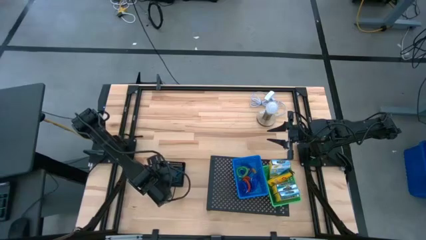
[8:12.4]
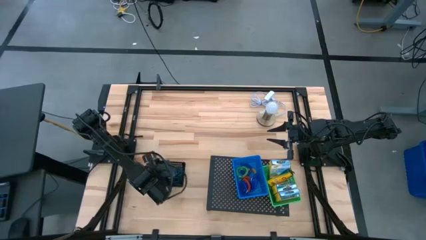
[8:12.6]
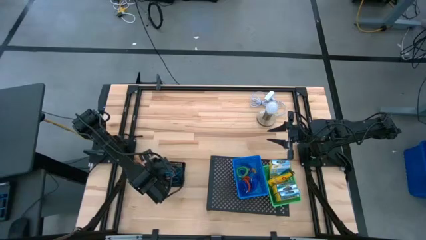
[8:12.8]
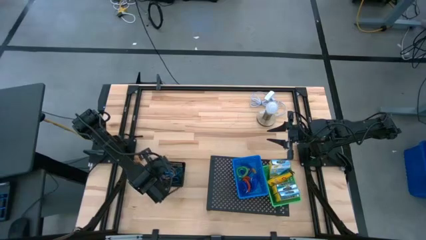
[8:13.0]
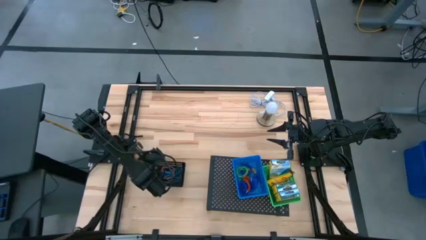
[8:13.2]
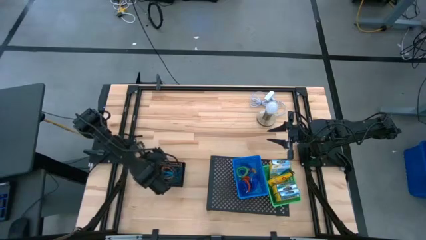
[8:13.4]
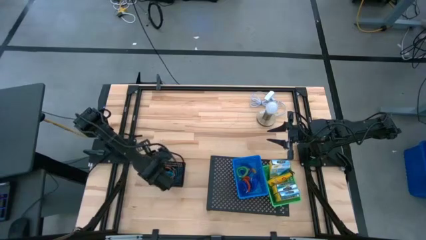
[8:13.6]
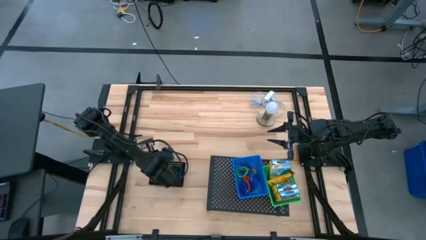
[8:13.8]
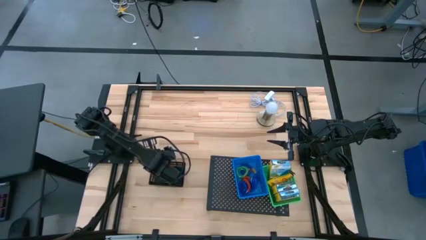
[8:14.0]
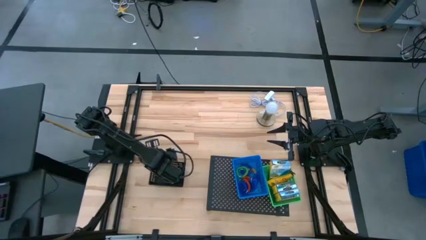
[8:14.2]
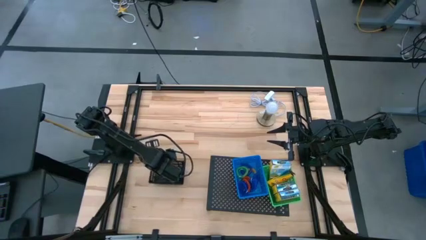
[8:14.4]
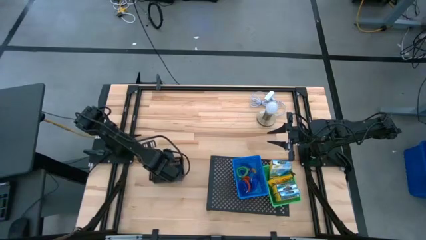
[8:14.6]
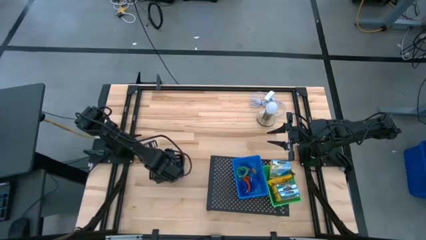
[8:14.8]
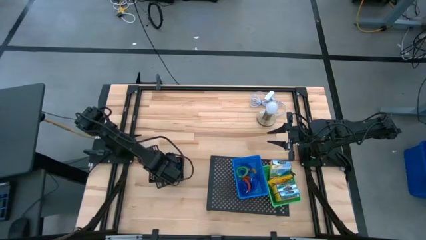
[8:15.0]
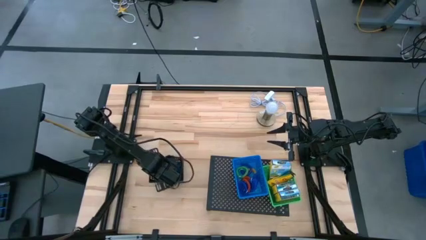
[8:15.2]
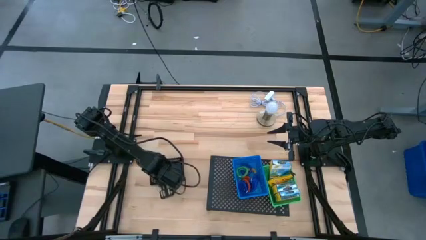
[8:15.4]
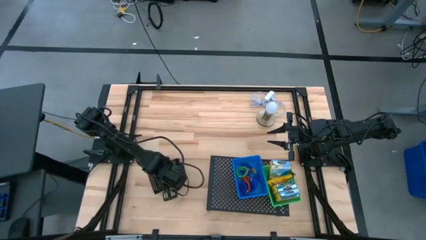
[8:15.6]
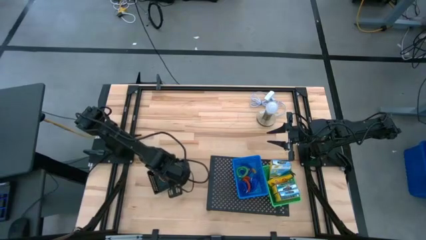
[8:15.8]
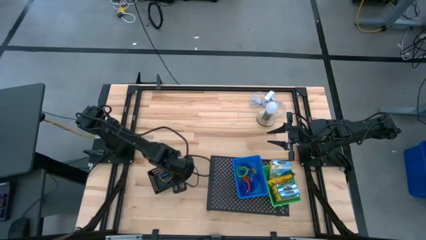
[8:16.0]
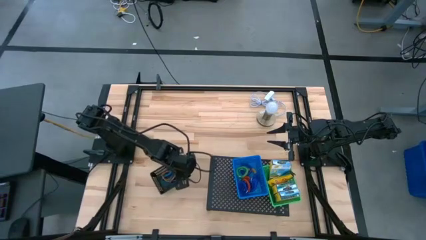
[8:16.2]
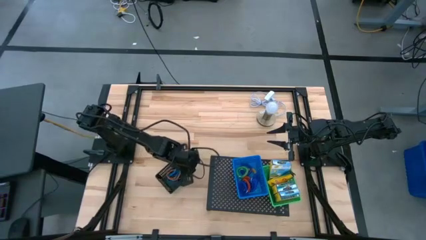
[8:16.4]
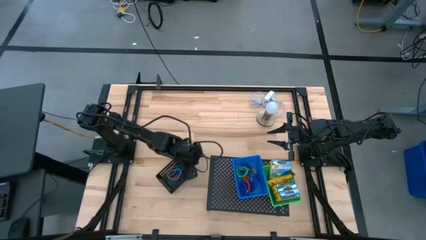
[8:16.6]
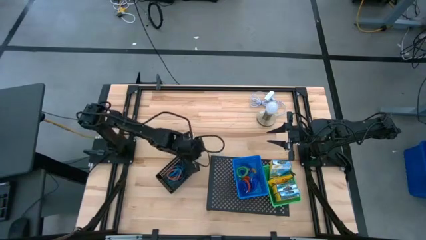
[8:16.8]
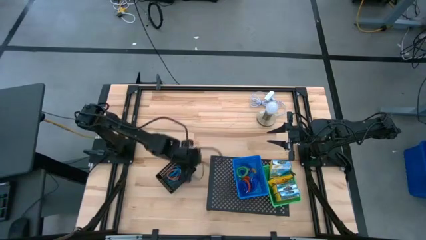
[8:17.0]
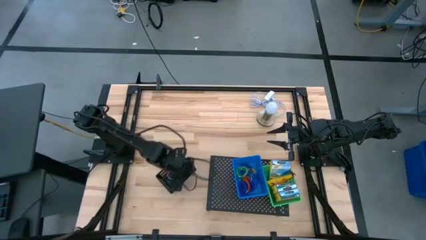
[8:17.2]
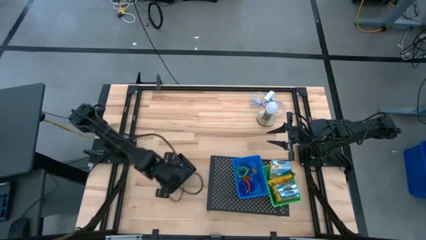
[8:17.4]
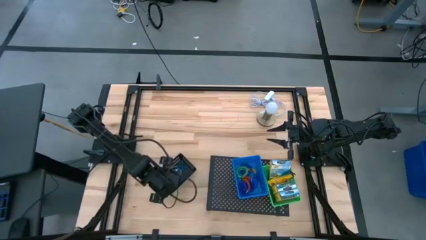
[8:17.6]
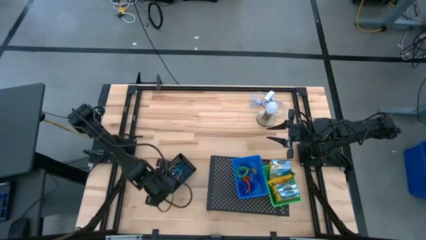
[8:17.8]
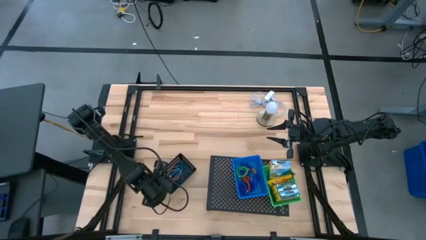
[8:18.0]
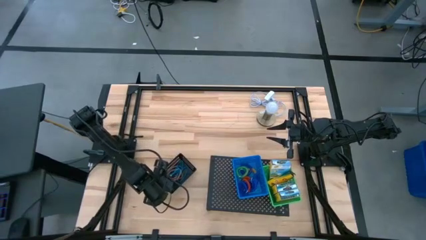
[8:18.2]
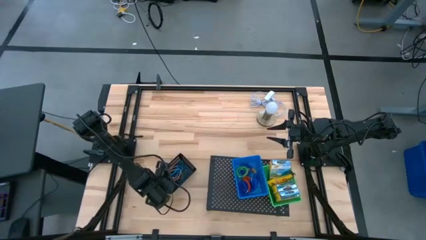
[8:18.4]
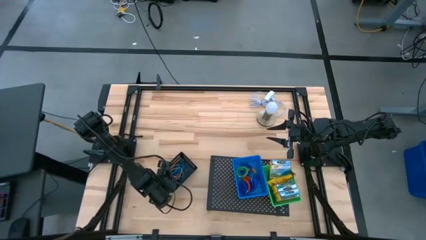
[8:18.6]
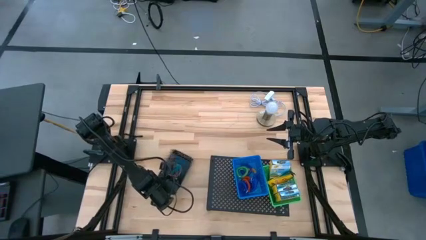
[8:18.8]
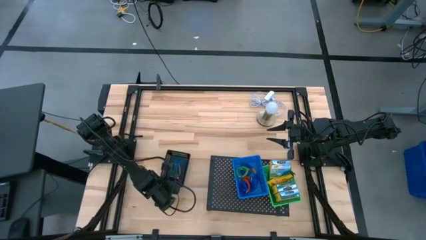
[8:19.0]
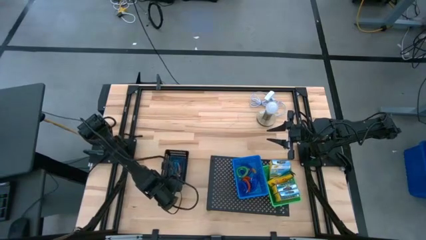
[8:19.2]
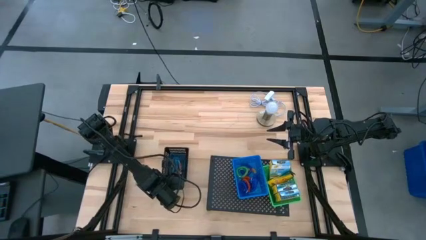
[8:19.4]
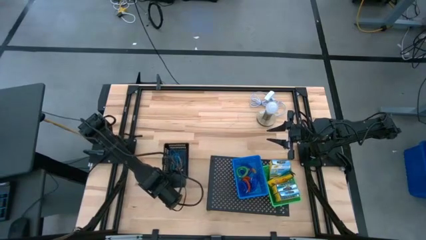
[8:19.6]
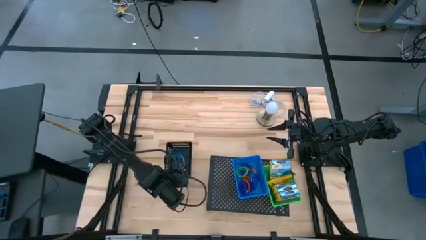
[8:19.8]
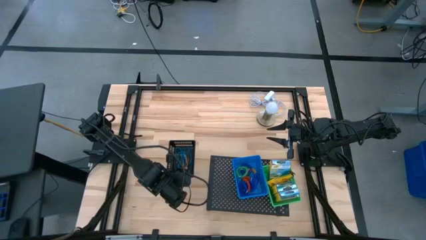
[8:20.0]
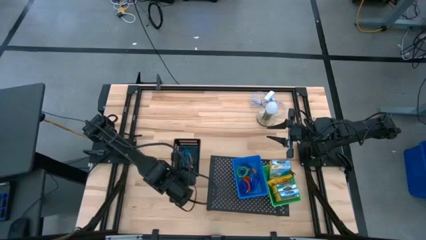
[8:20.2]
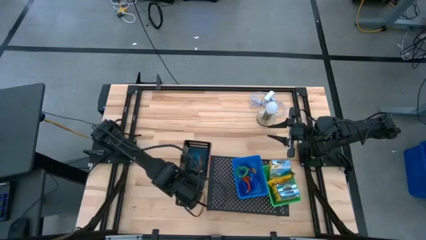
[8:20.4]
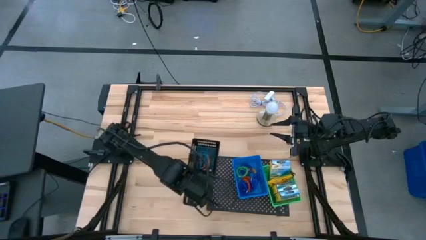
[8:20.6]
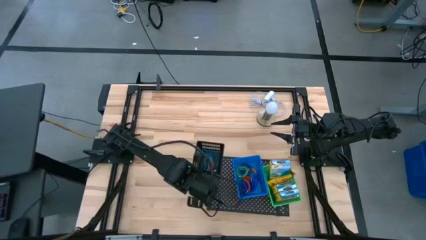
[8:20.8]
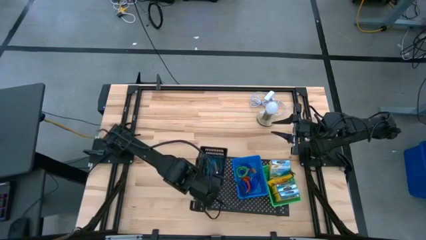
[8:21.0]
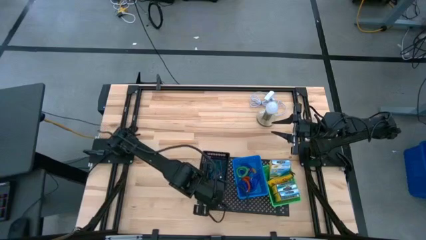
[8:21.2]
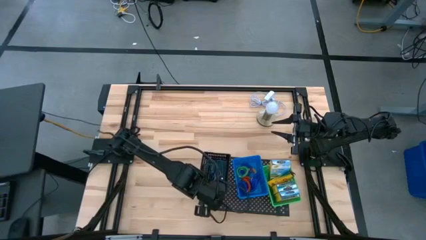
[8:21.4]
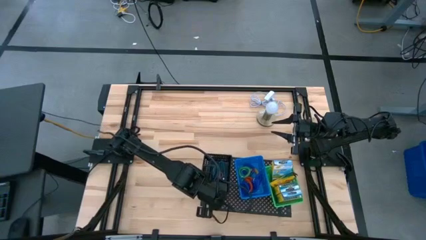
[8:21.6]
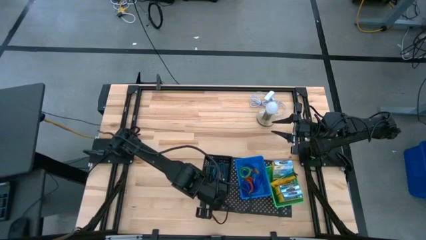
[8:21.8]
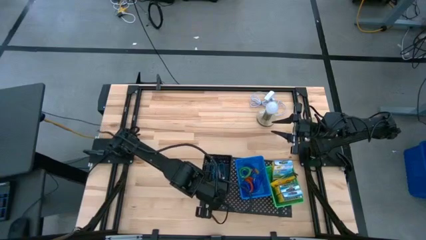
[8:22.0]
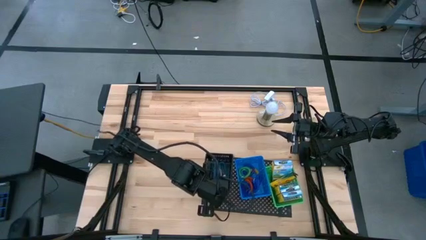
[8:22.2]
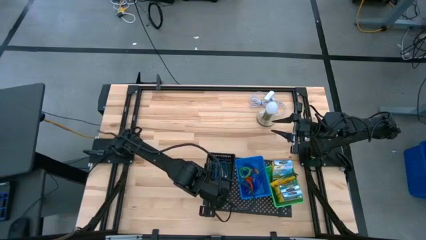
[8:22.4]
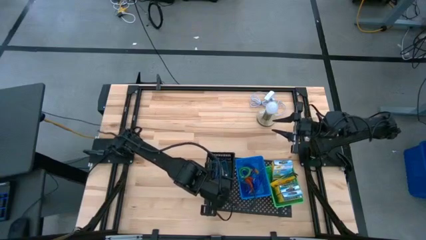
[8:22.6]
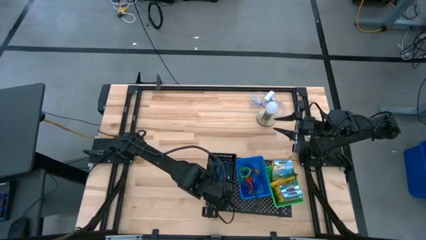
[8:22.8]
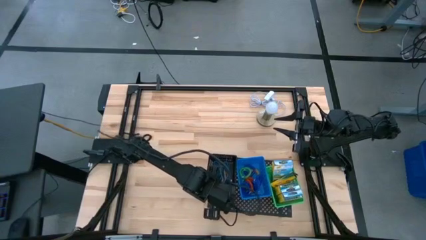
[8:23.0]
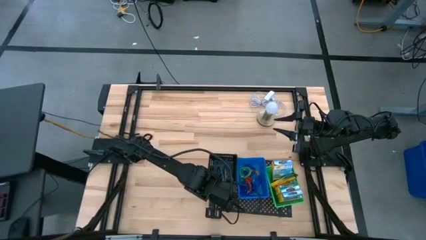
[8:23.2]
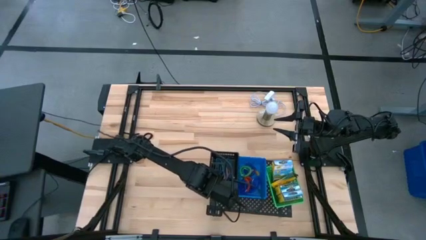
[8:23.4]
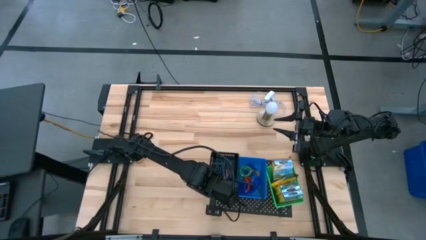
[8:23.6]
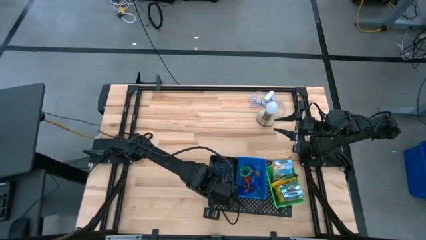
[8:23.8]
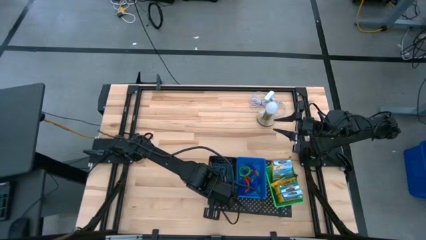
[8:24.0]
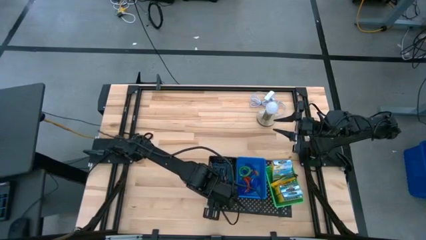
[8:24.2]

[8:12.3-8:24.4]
Task: Pick & Place Office Desk Supplies
Put the black bin with the rubber bands on the shelf

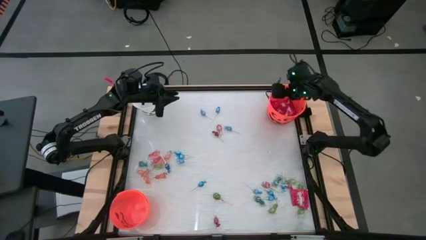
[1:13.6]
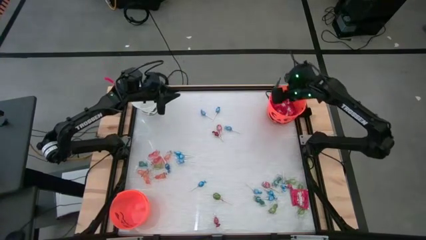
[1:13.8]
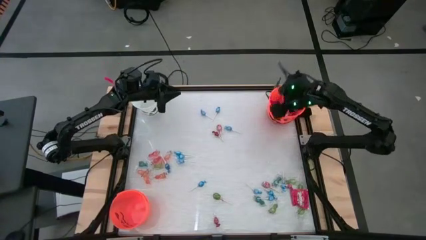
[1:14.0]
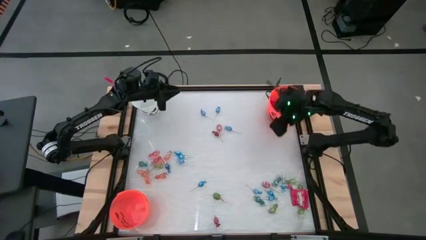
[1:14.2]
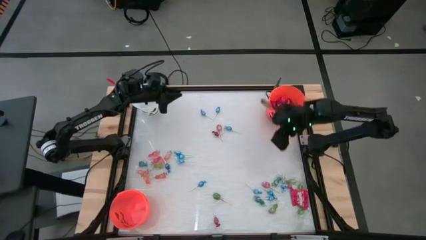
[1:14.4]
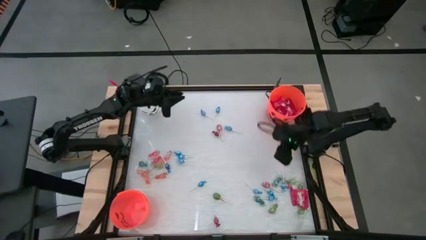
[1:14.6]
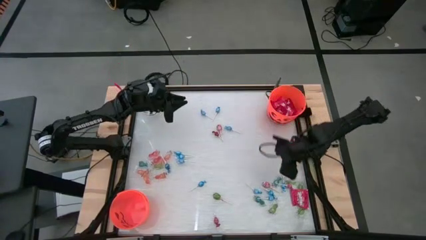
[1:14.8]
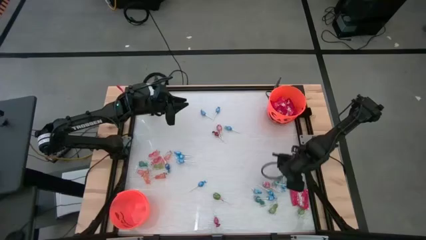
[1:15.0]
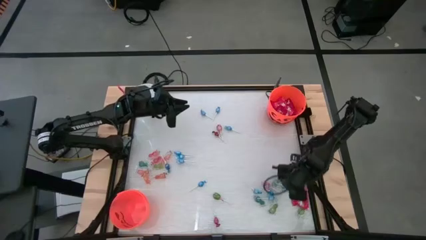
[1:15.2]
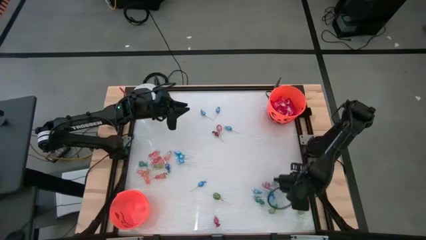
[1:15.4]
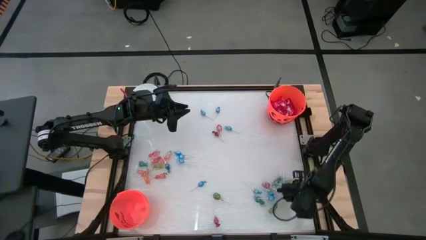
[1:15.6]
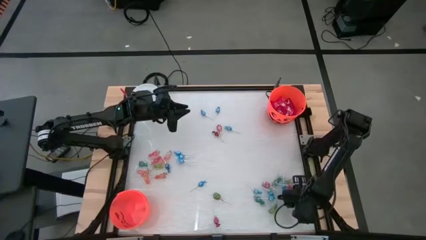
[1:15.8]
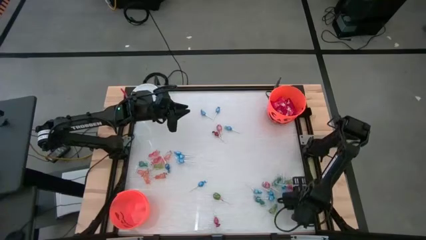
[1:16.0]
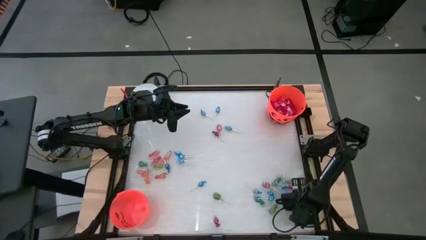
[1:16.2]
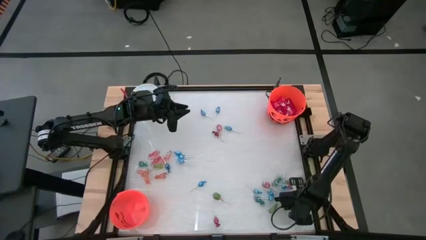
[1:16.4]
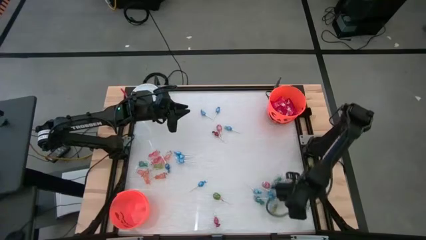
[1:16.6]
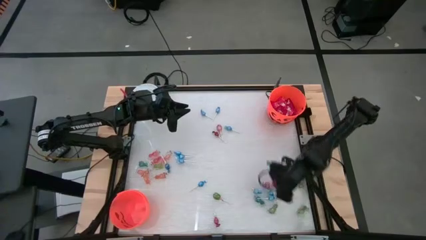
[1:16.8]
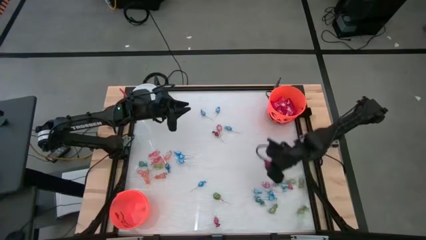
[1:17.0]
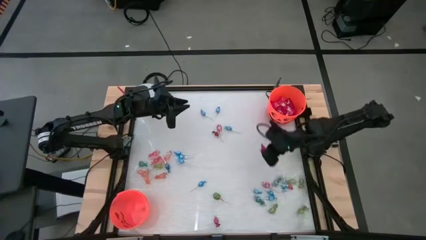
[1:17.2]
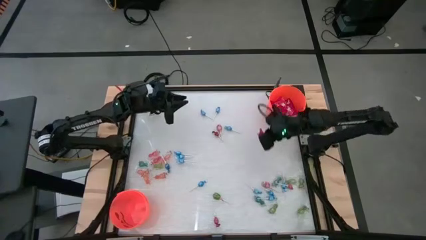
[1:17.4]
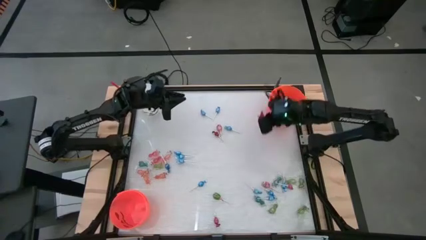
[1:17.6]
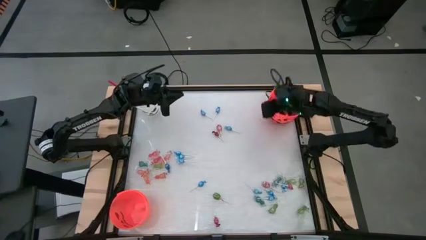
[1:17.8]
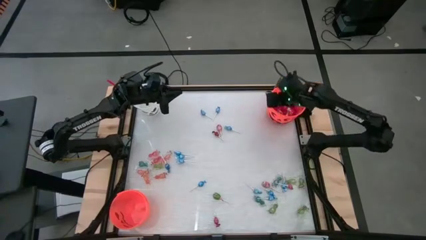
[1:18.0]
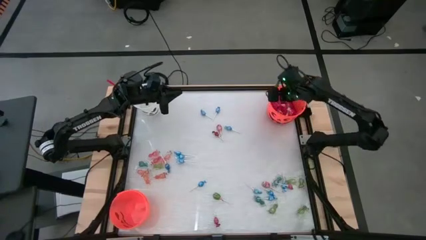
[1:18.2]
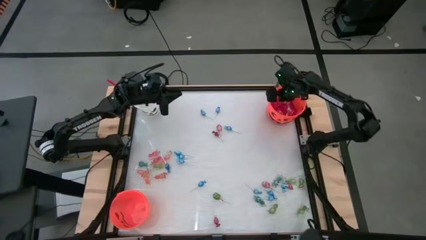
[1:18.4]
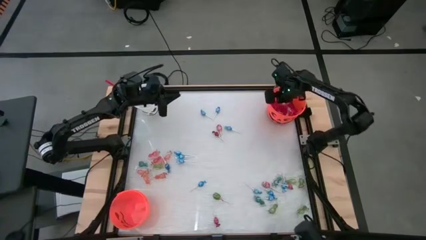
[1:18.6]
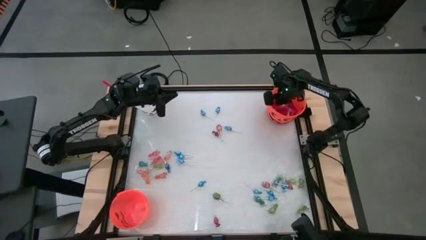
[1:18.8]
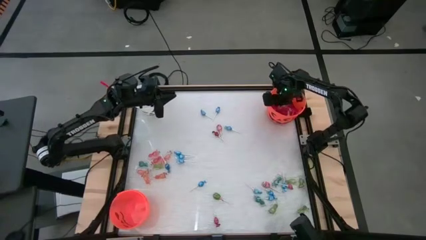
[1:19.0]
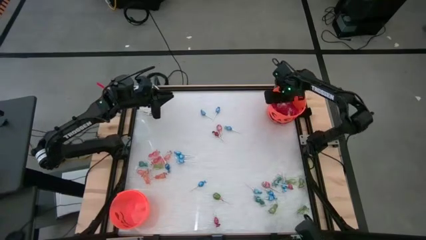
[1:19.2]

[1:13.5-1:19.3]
Task: Sort candy by brand, put in halloween buckets
Put the red candy into the top orange bucket
